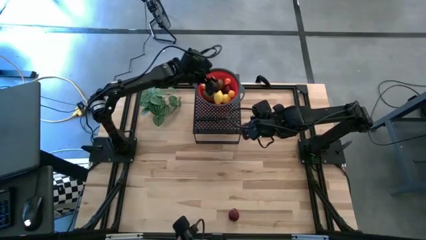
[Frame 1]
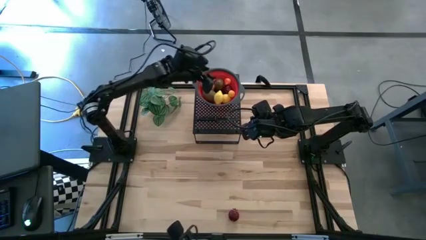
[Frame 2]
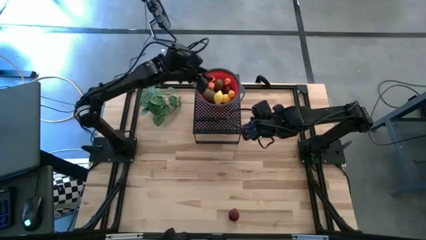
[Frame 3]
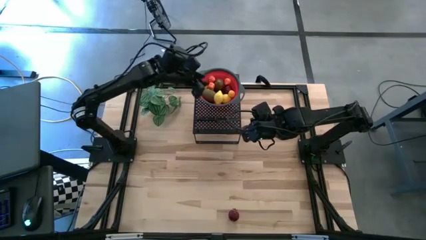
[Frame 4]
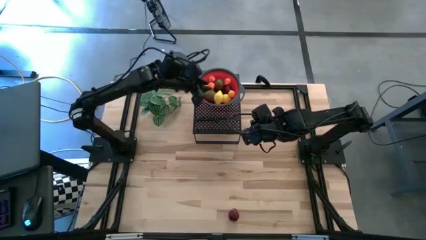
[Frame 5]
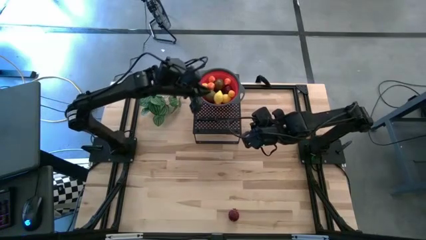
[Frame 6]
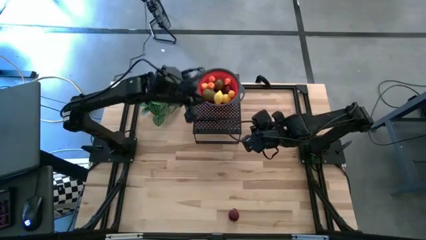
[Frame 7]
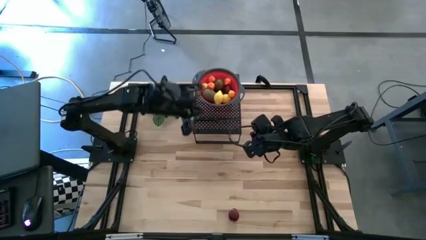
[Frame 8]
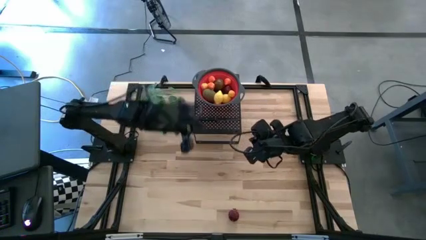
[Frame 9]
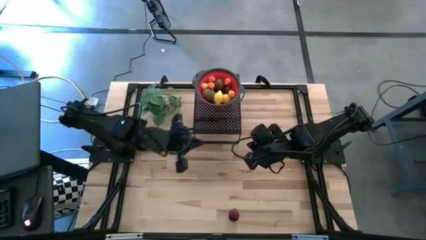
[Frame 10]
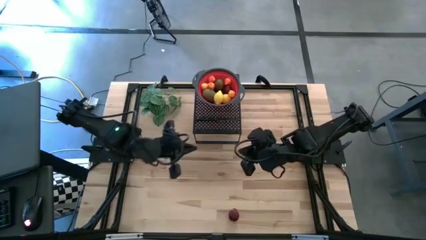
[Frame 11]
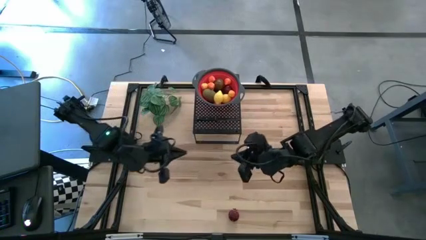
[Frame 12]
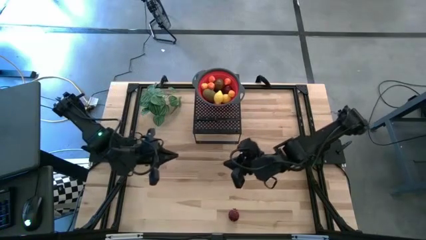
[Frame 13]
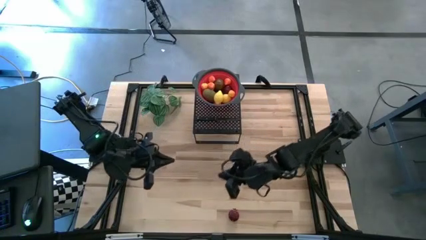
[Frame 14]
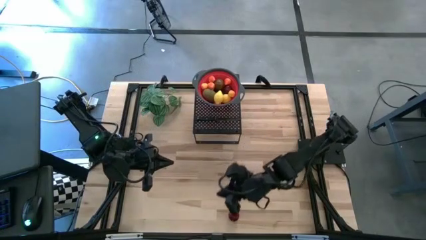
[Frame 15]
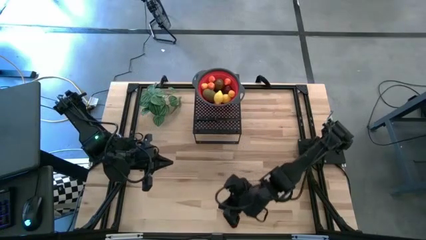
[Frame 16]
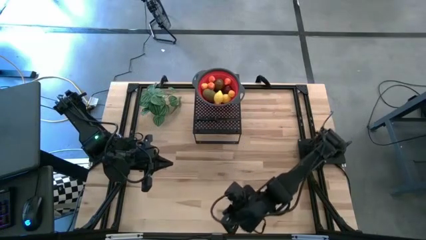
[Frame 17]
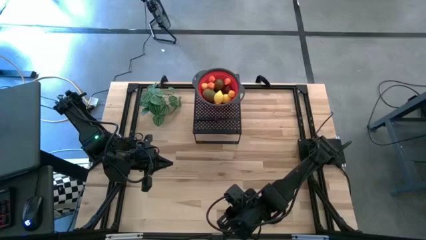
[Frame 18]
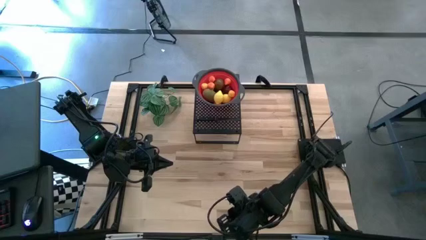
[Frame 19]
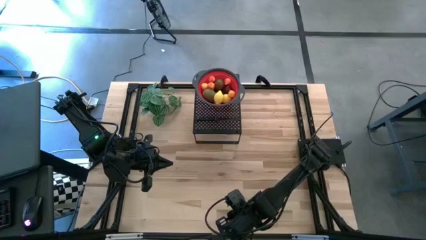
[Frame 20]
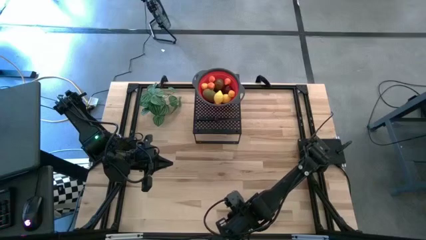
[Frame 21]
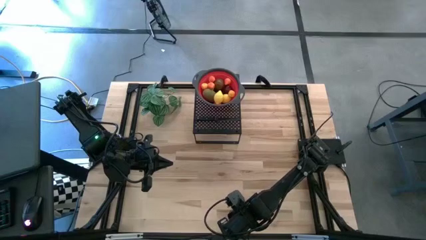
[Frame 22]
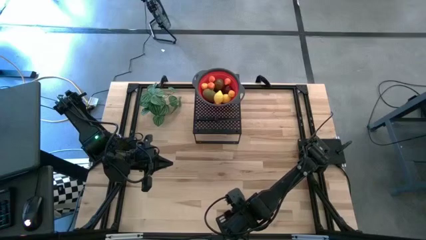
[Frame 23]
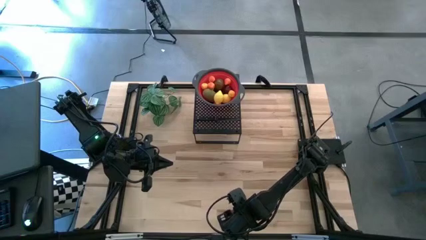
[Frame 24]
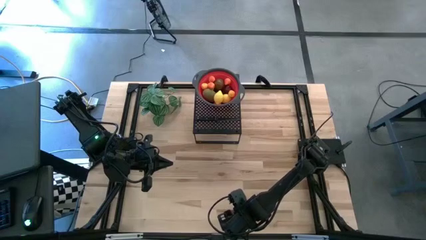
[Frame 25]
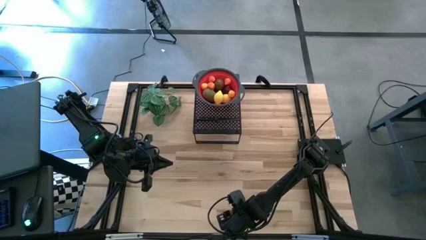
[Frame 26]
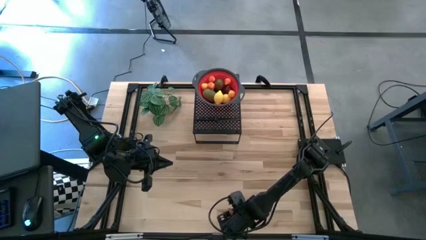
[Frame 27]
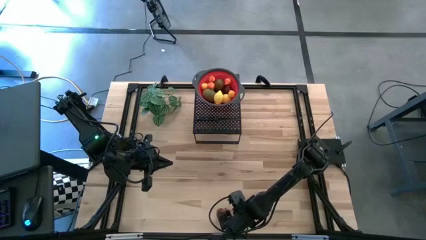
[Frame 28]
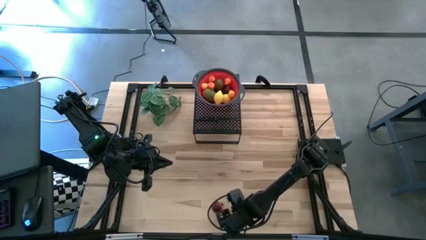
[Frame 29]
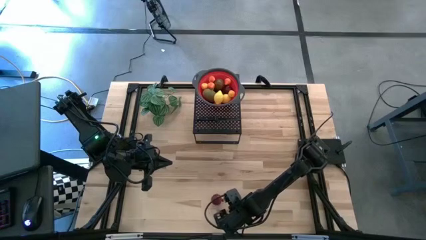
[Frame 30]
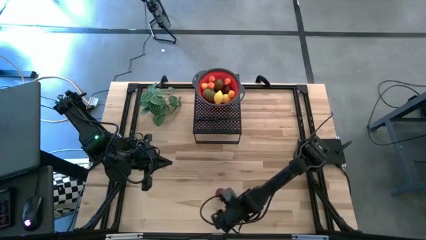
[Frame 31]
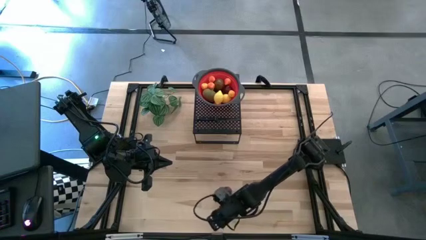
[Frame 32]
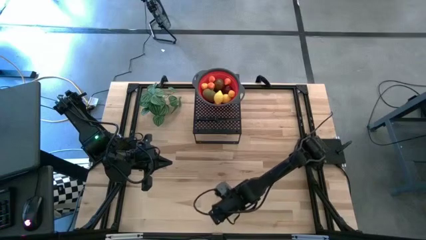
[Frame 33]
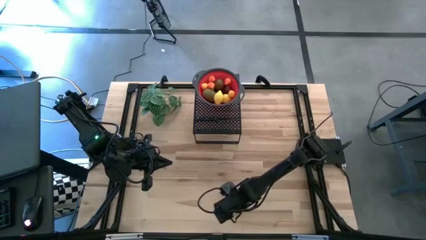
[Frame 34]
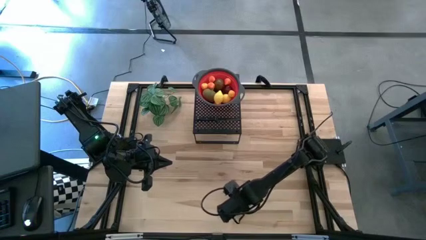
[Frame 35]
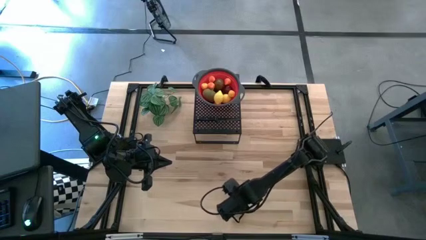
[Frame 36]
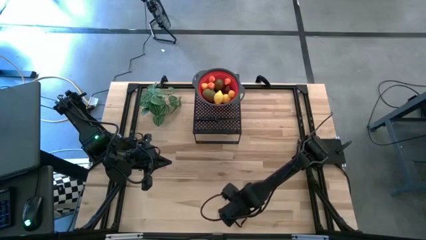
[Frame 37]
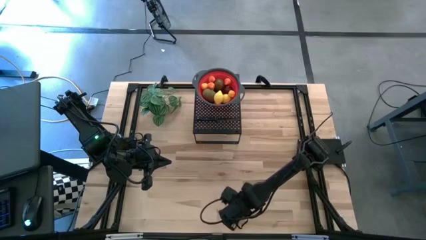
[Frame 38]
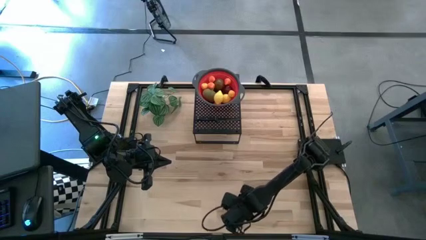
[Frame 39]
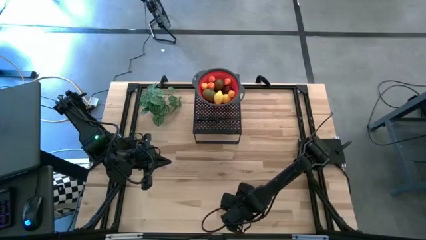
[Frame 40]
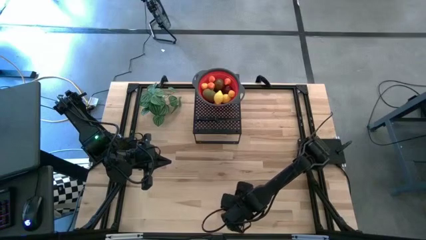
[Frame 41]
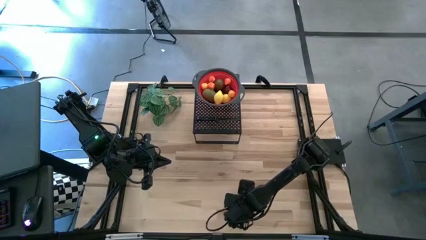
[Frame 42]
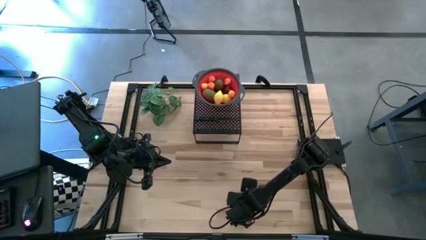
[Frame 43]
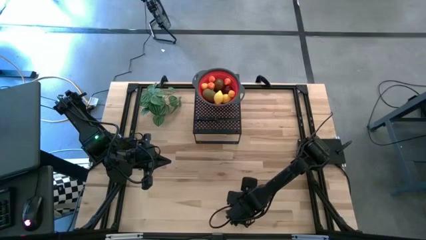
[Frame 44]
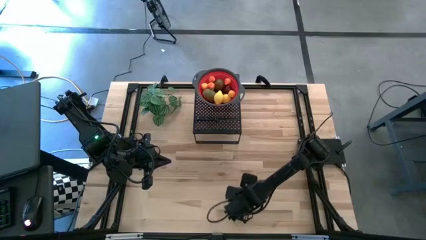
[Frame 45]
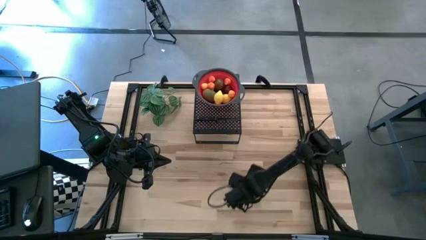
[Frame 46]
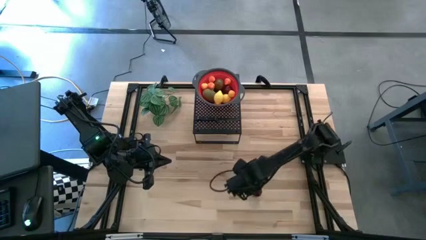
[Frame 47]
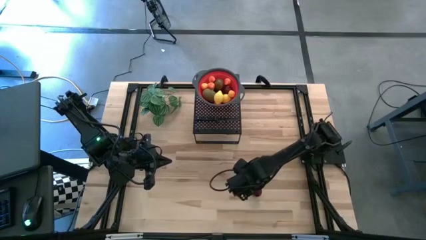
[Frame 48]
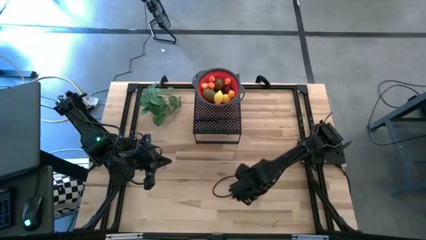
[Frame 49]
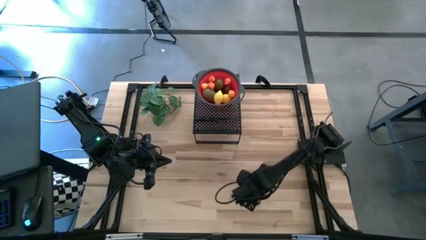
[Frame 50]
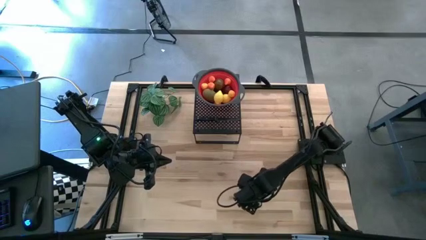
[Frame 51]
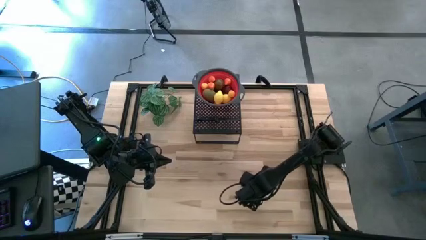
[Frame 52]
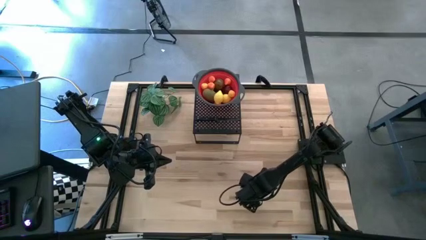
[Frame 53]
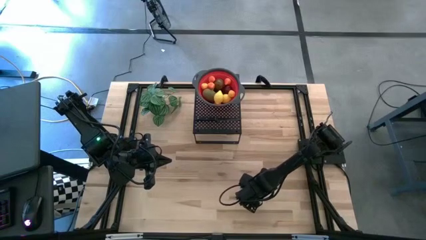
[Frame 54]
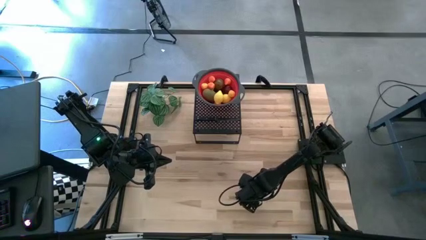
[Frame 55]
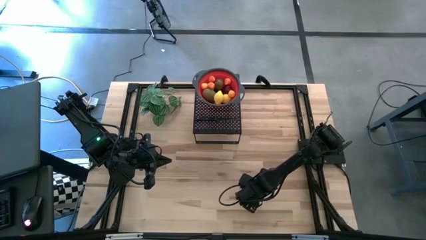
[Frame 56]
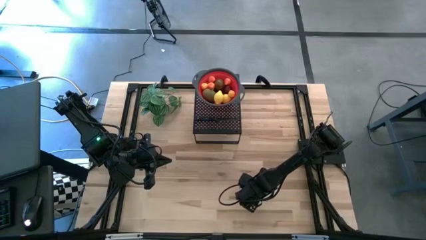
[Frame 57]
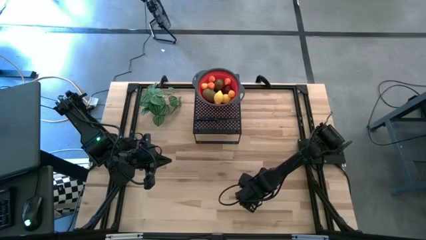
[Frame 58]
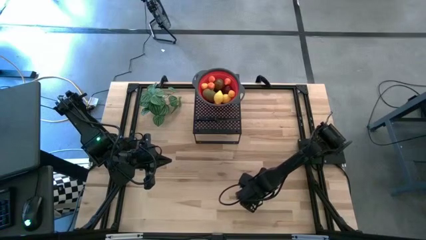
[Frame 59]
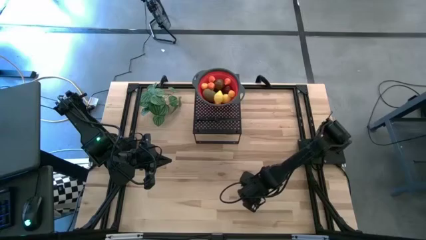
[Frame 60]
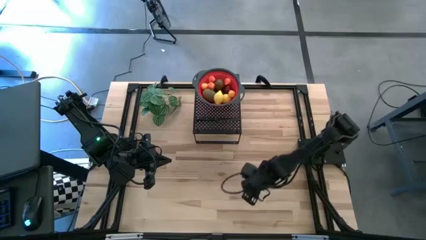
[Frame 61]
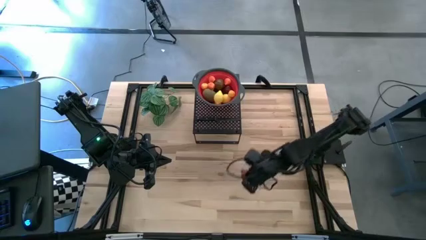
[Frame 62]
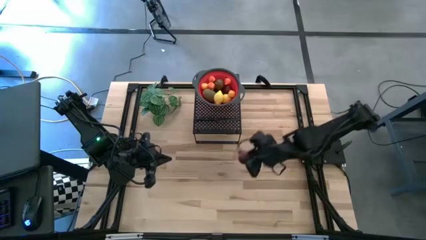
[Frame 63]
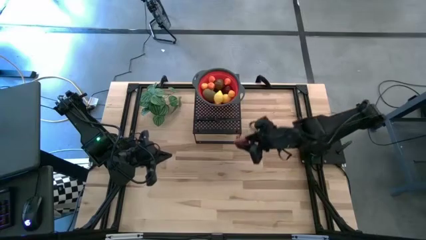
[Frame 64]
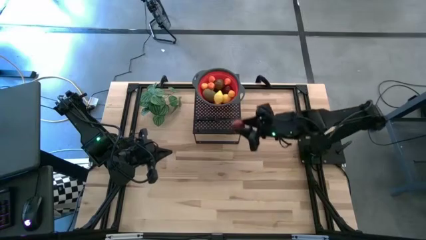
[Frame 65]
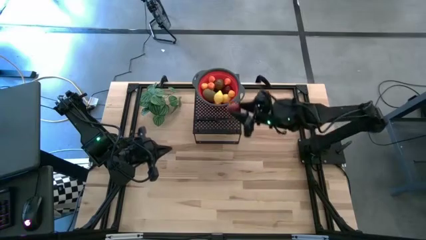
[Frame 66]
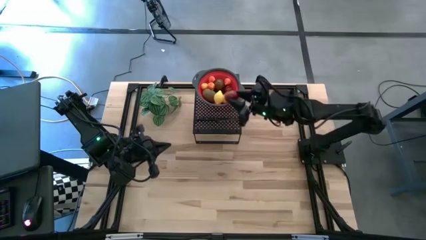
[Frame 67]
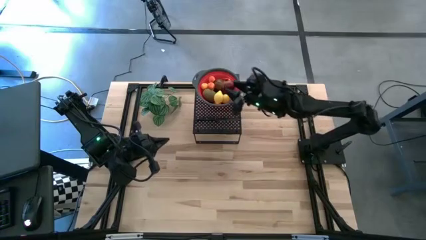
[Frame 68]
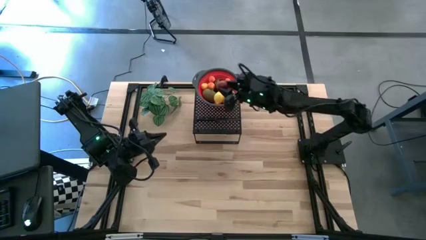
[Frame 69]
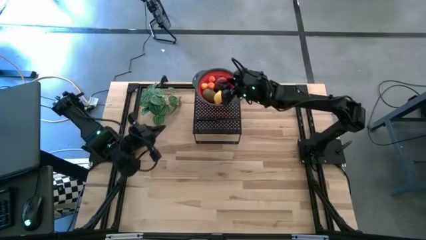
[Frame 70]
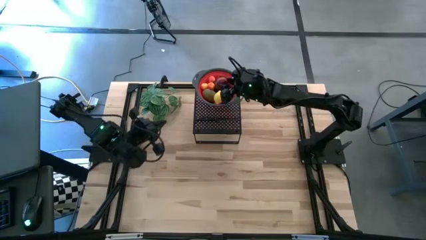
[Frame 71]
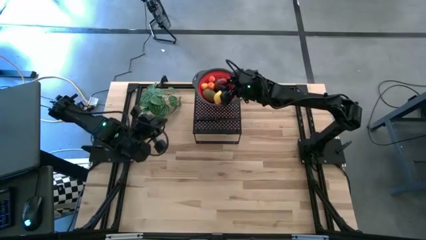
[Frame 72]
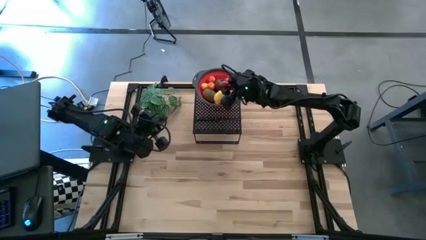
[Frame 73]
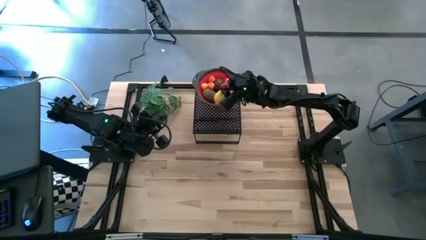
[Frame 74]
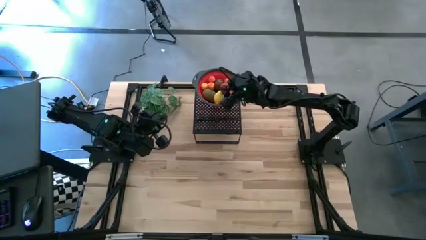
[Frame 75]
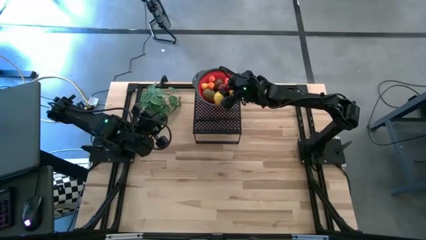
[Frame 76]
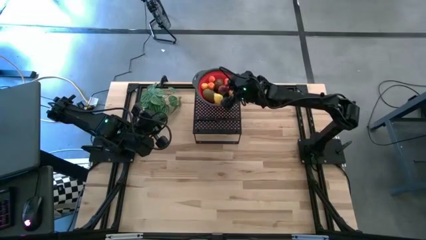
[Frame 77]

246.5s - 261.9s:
Task: Pick & Place Fruit
Put the pomegranate into the red strainer bowl
